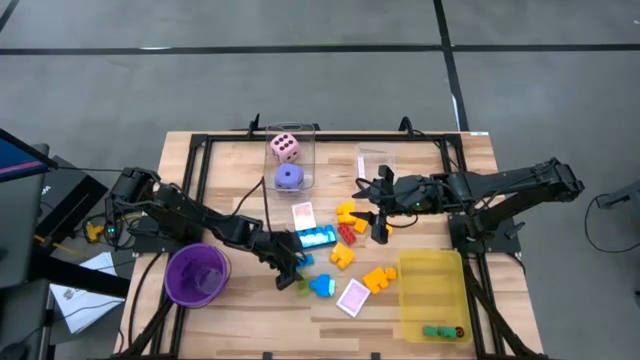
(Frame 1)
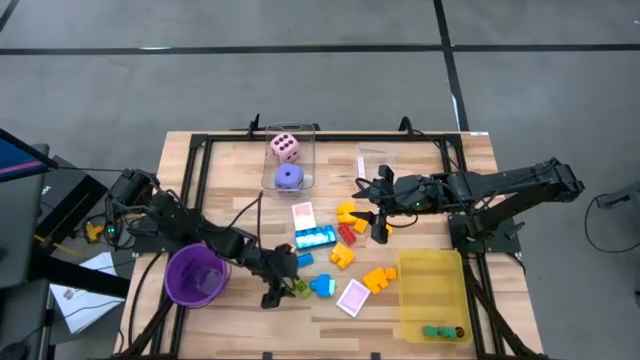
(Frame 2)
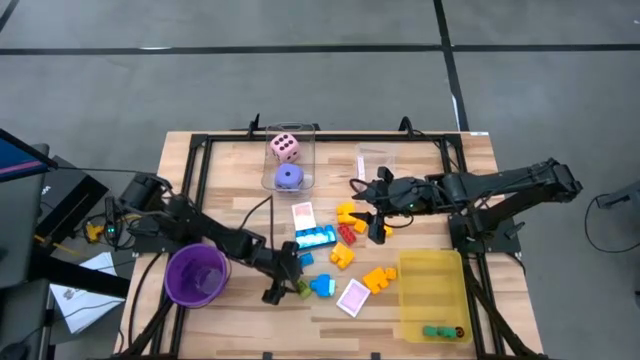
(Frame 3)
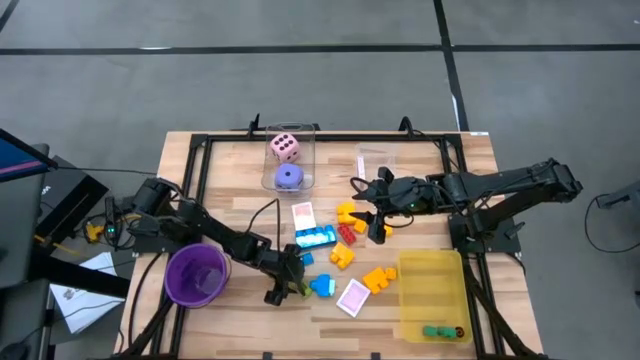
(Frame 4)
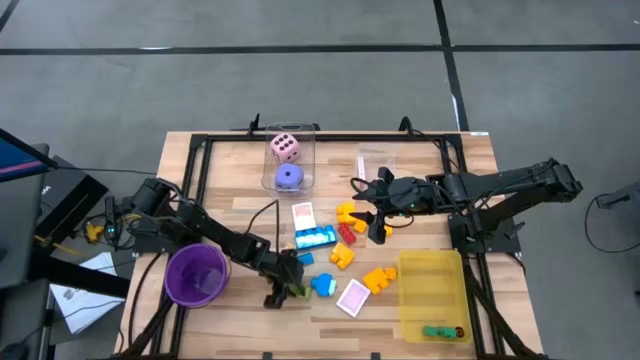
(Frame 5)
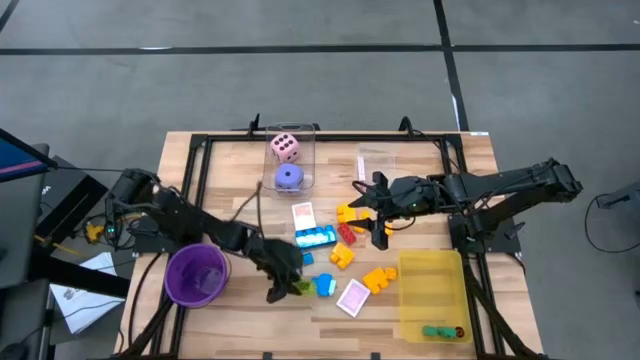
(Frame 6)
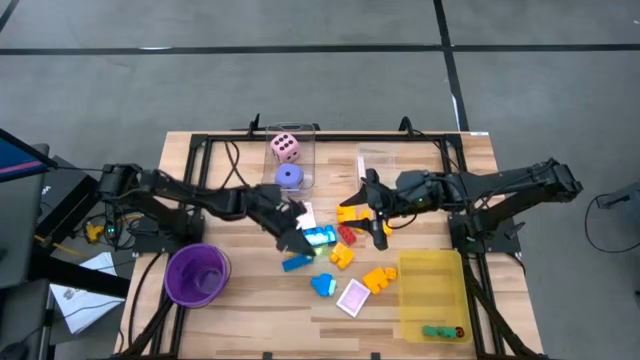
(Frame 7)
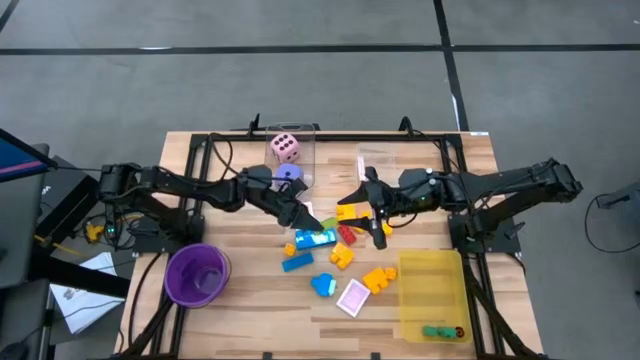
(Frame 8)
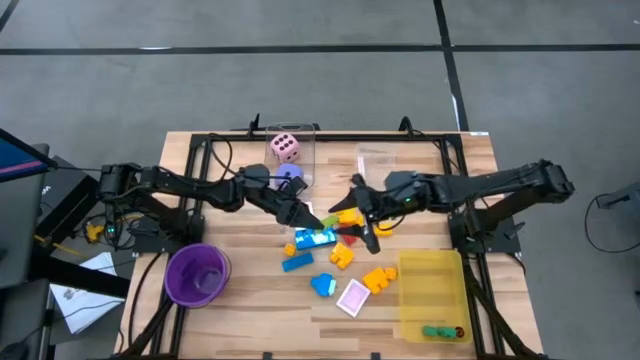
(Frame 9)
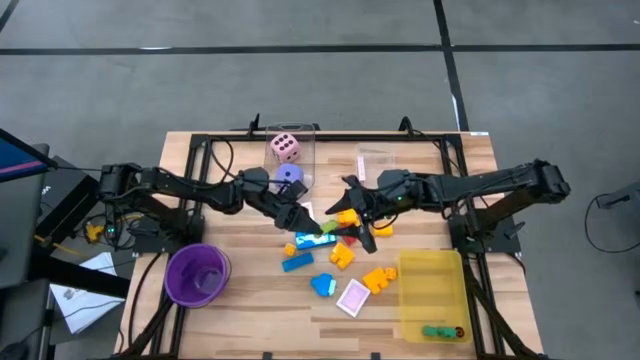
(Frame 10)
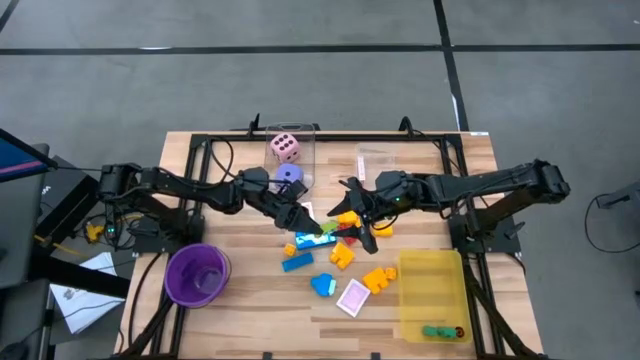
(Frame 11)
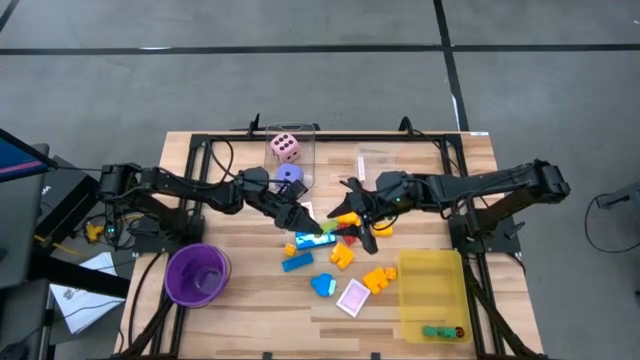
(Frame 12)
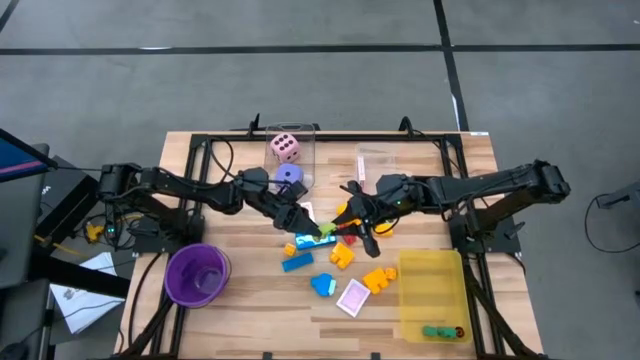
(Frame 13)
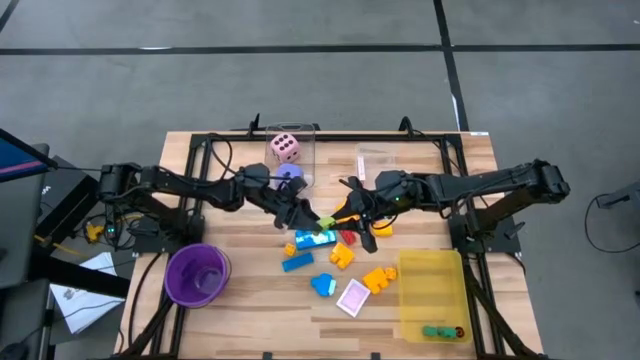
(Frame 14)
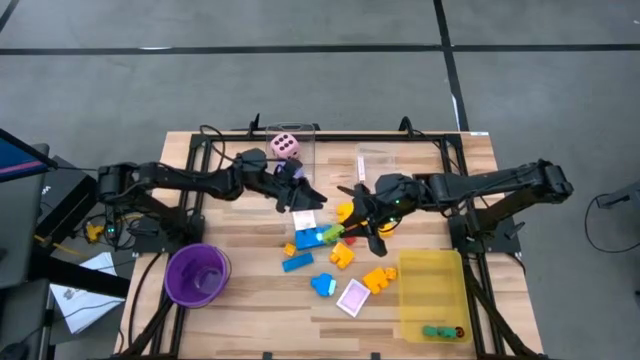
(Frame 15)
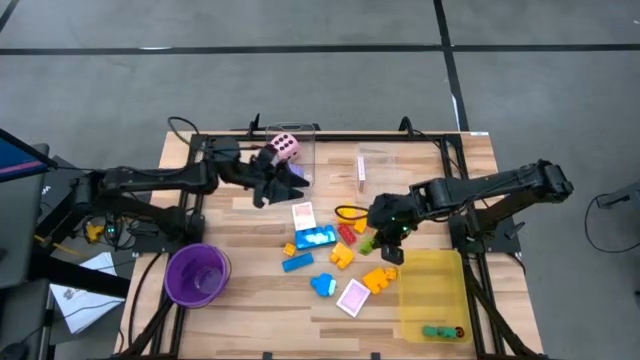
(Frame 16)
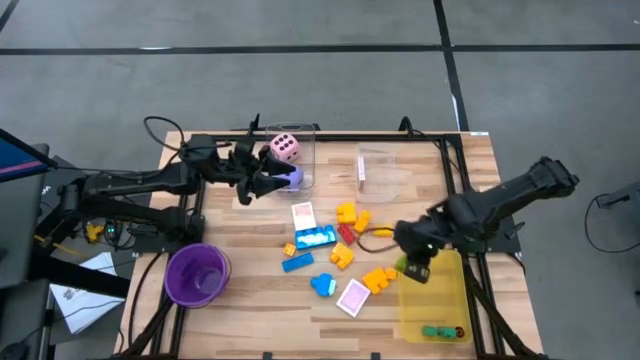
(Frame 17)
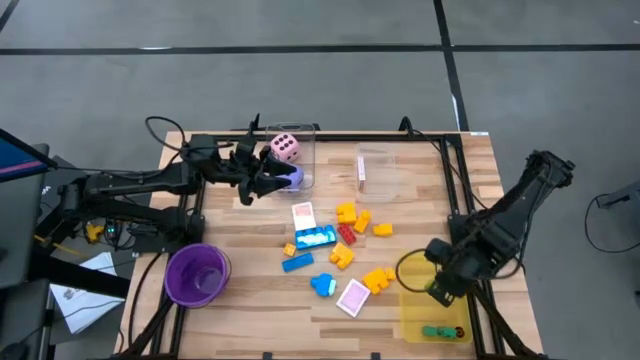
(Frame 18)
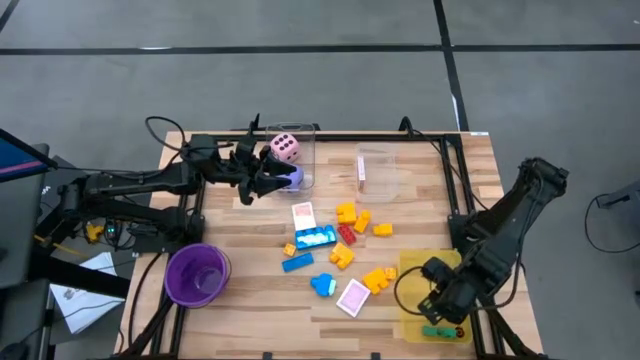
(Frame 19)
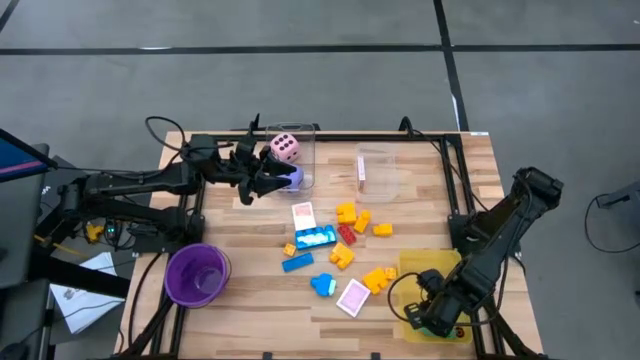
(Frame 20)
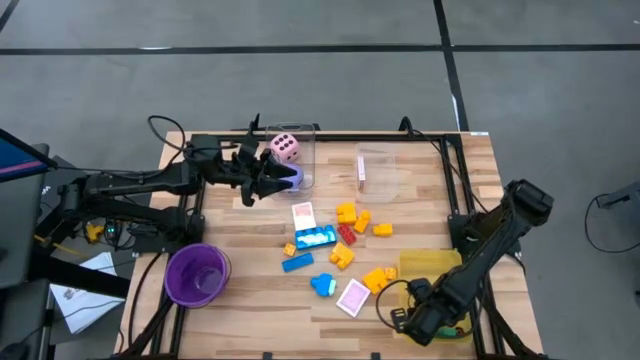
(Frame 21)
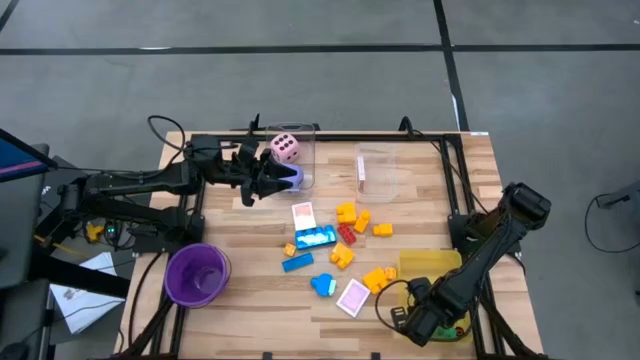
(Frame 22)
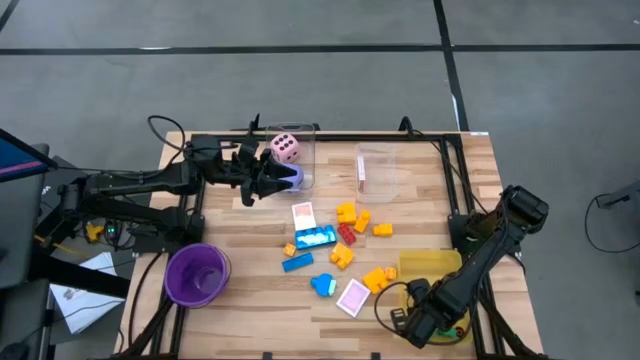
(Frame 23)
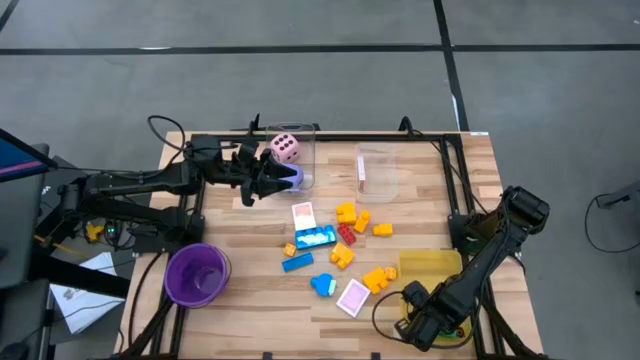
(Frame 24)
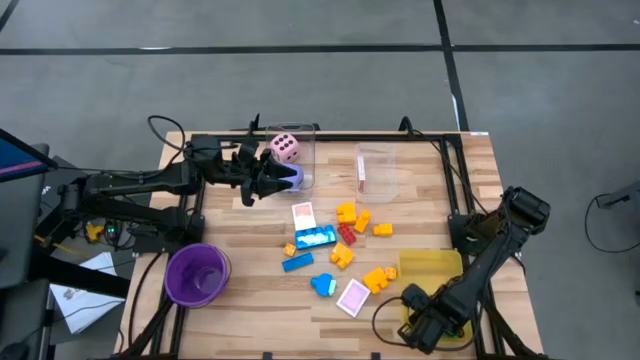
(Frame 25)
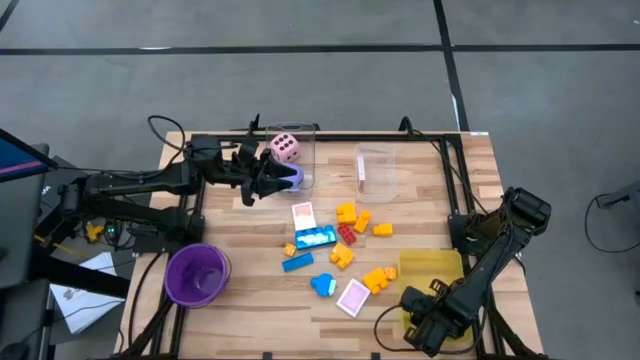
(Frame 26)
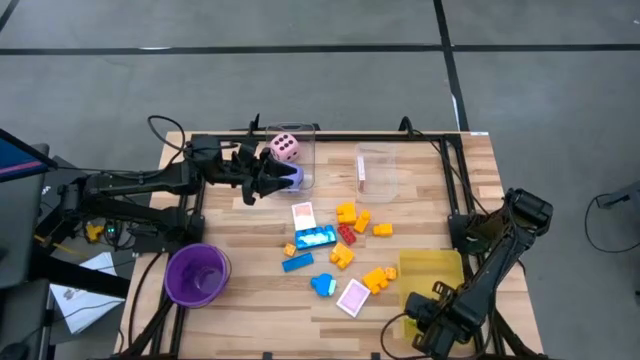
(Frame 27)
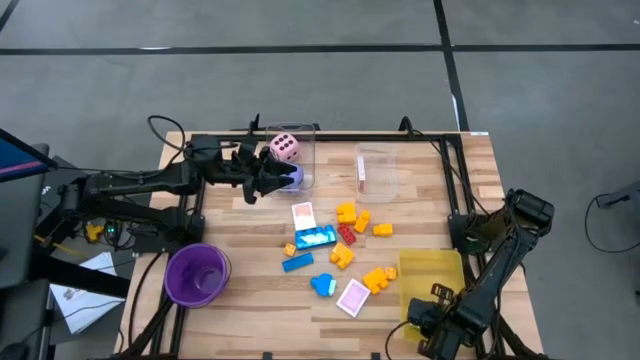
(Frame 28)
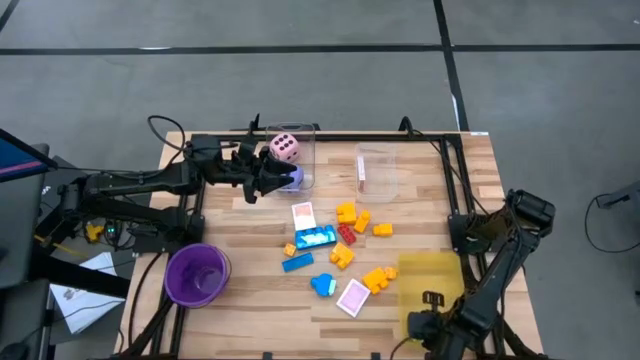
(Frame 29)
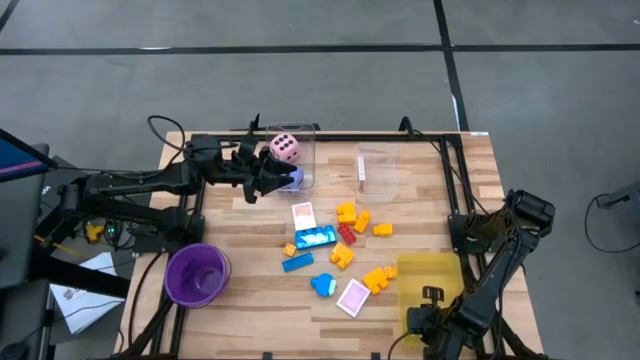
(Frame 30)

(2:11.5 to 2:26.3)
Task: Pick & Place Toys
Put the light green game piece into the bin

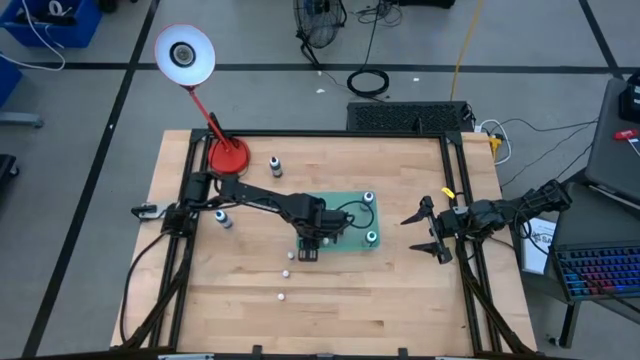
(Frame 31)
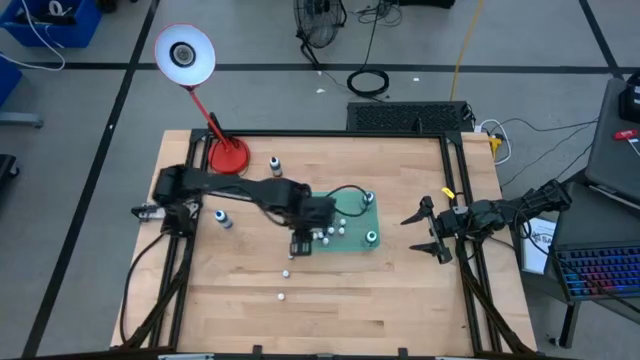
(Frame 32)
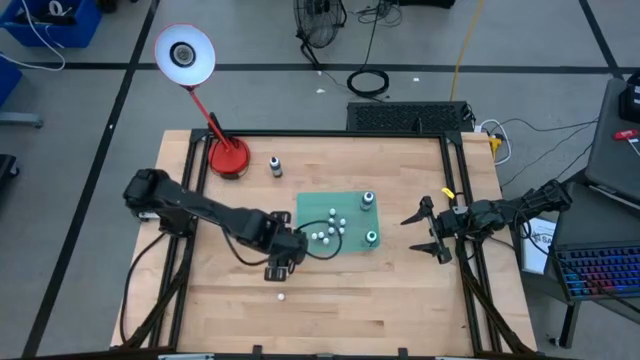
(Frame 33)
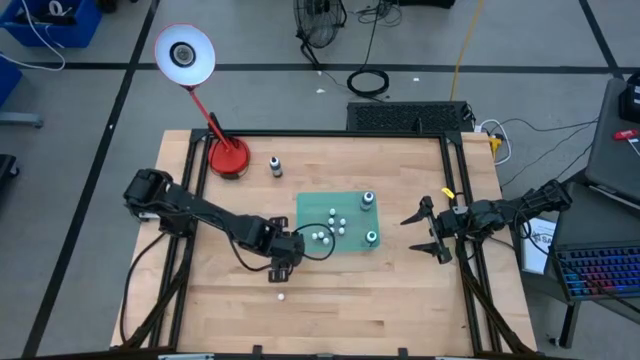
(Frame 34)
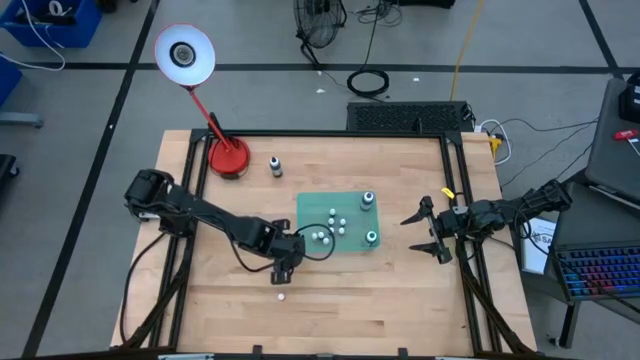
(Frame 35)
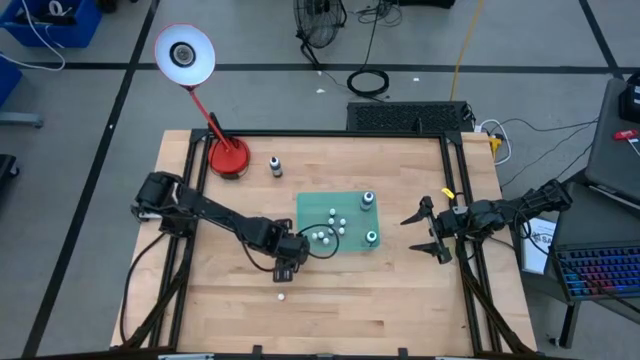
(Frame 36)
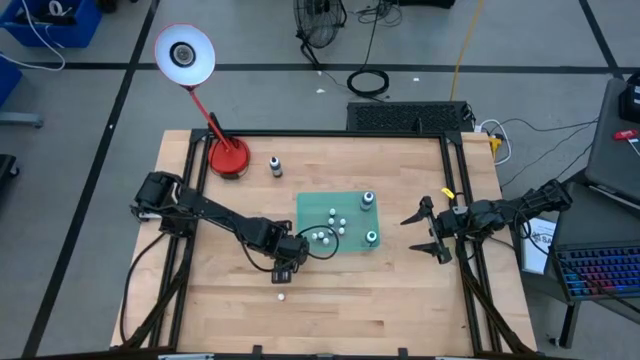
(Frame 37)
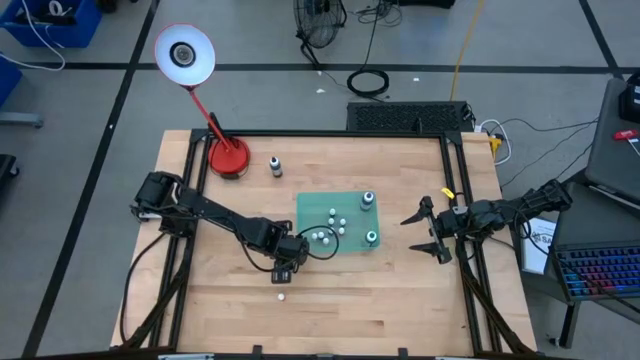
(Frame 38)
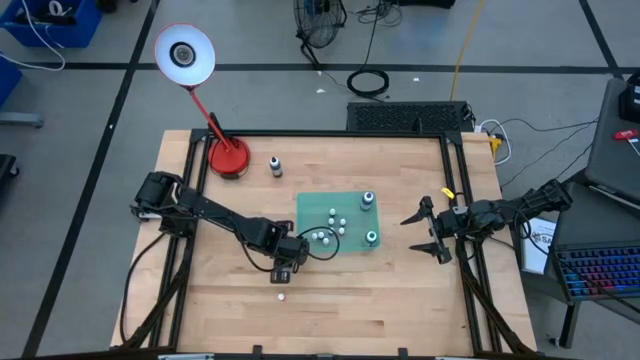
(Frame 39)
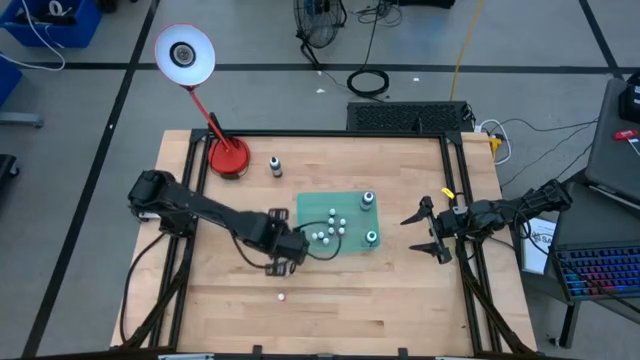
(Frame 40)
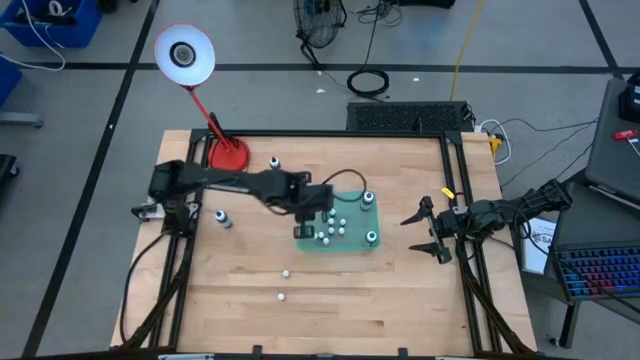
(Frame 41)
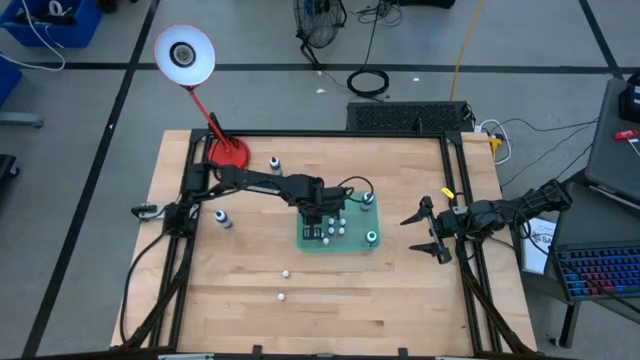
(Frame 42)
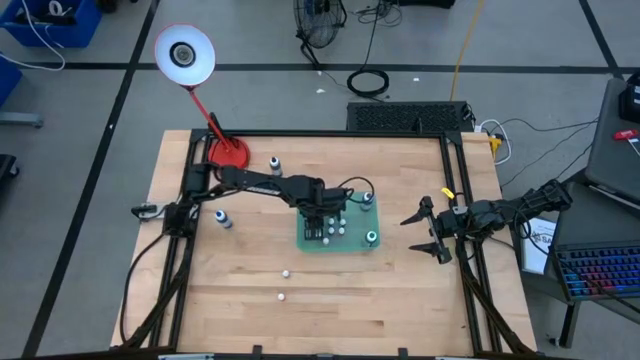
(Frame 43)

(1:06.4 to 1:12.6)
Task: Pick & Place food coloring
Put the small dark blue food coloring bottle into the blue bin

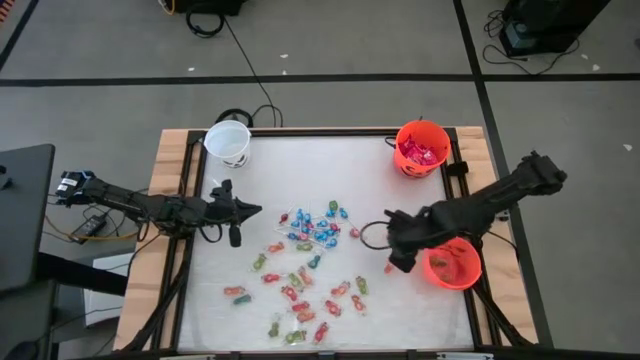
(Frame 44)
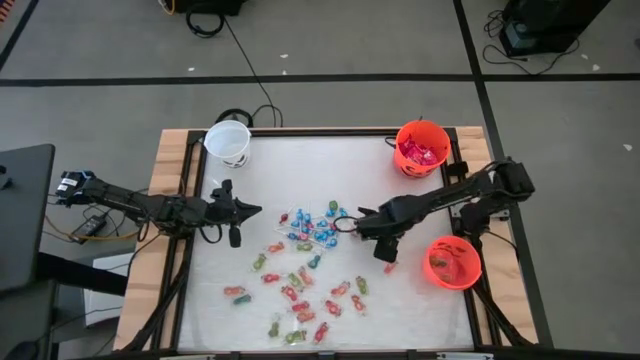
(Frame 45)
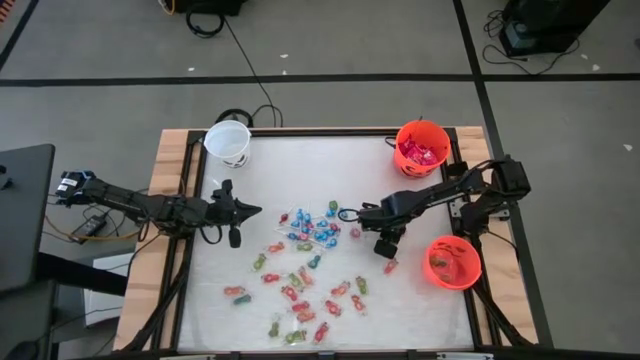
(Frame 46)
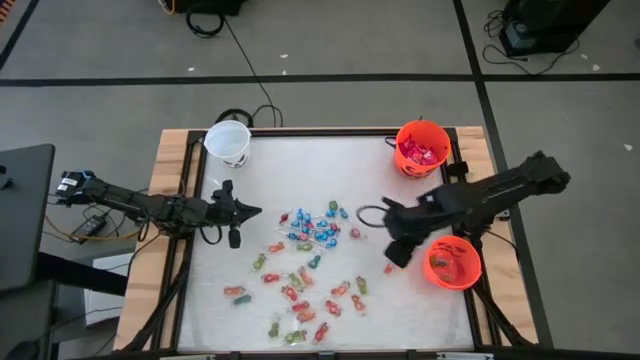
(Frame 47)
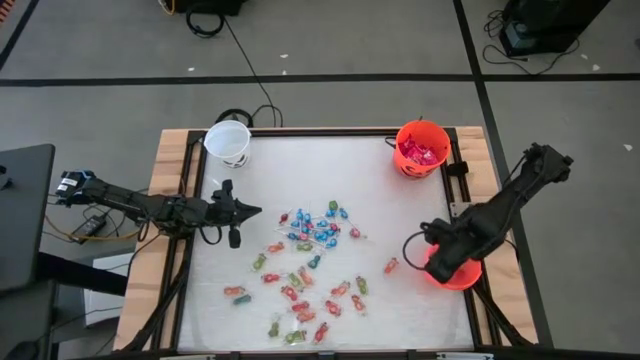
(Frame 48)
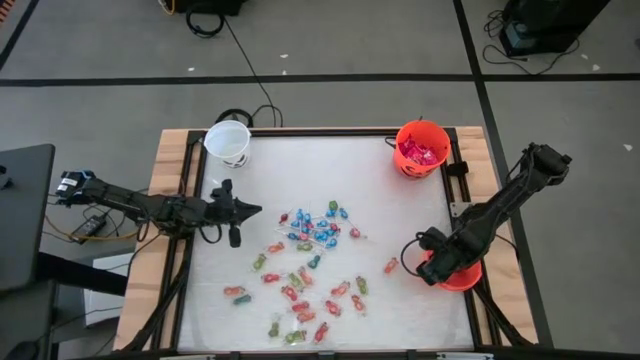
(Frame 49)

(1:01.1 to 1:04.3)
Task: Sort candy by brand, put in halloween buckets
Put the orange gummy into the bottom orange bucket
